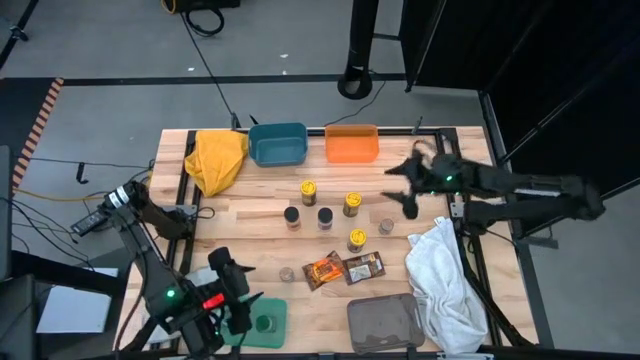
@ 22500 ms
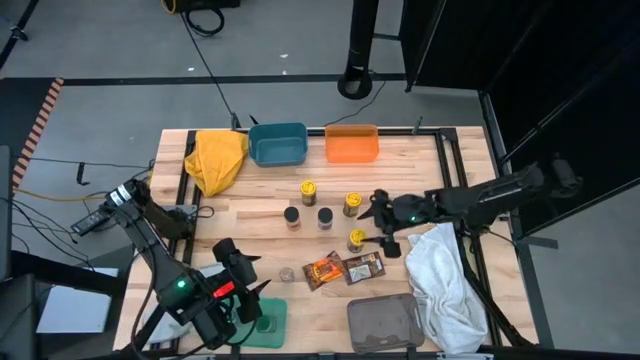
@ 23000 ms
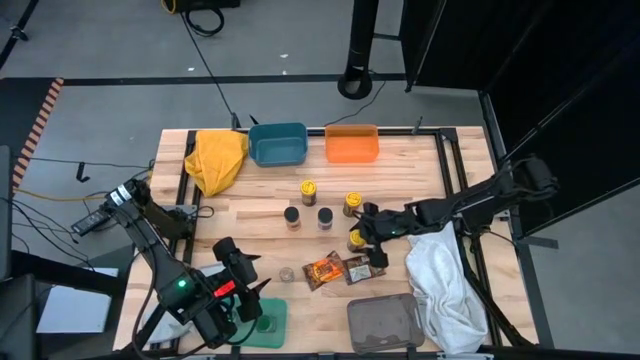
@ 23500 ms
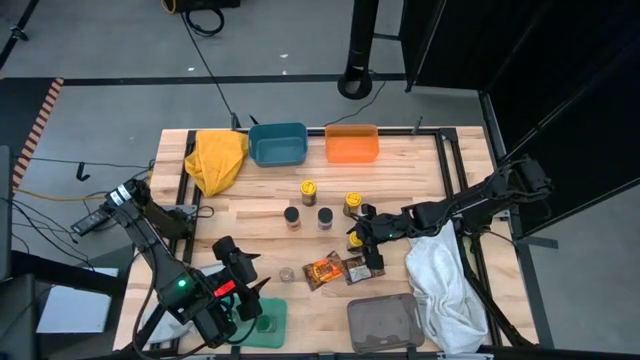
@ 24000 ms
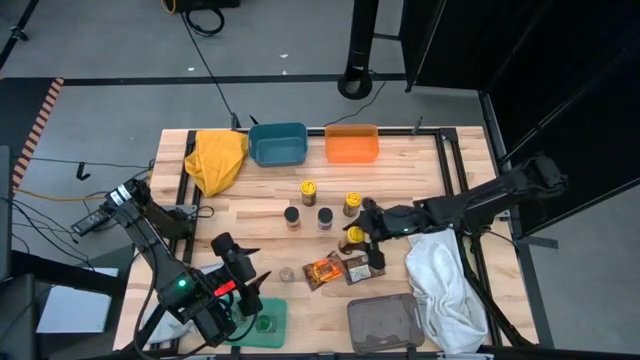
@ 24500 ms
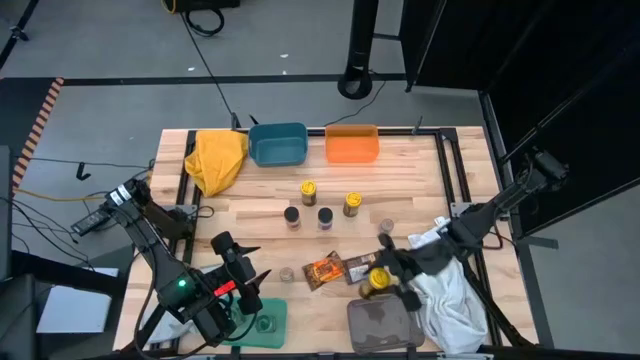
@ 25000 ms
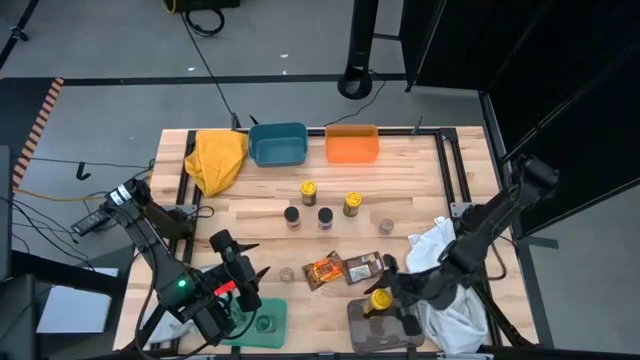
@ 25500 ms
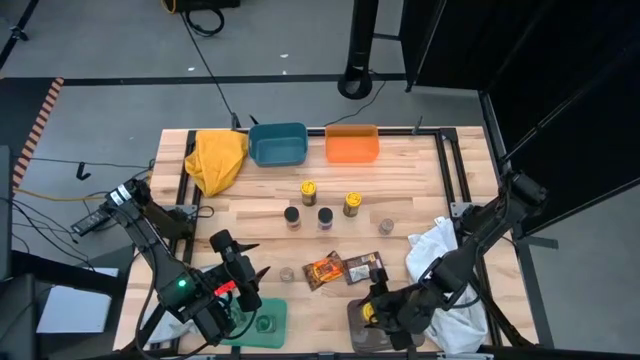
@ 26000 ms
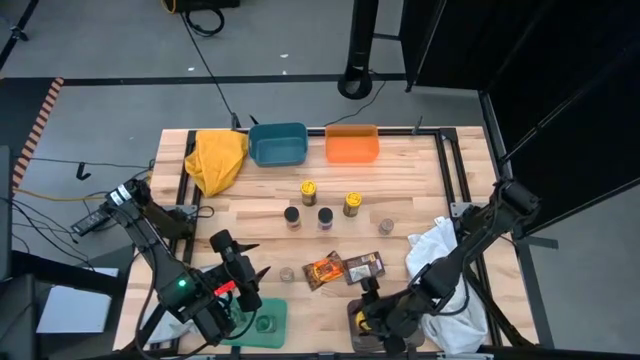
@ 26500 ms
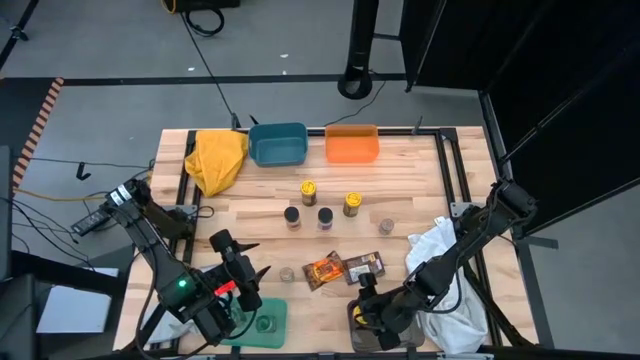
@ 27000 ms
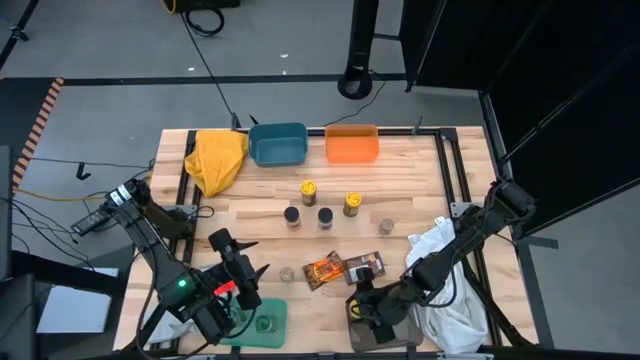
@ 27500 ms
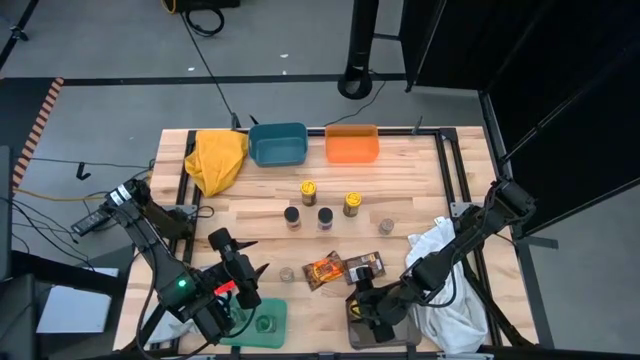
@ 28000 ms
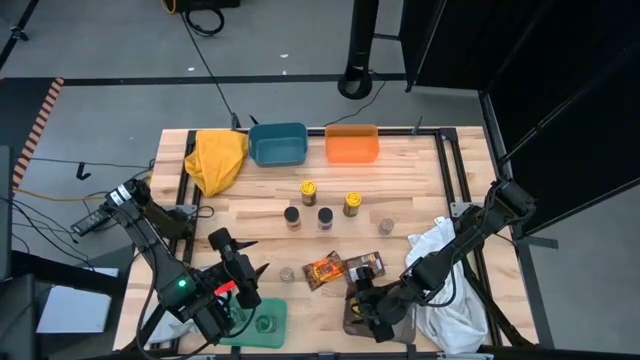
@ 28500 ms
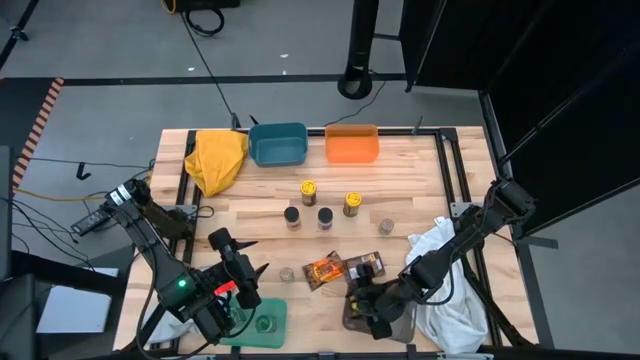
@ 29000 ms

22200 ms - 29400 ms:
Task: Sort spices by type
Put the bottom right yellow seasoning bottle into the black bin

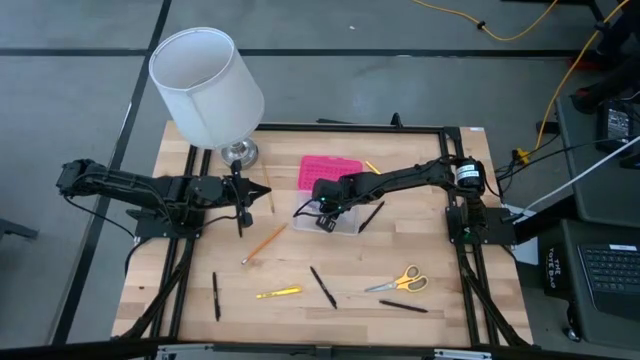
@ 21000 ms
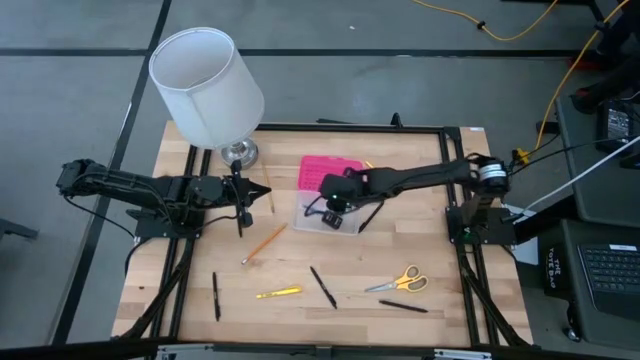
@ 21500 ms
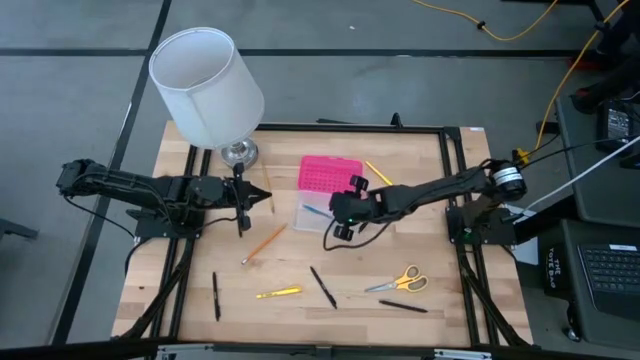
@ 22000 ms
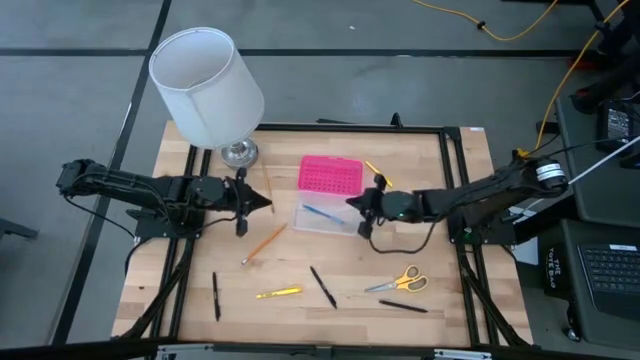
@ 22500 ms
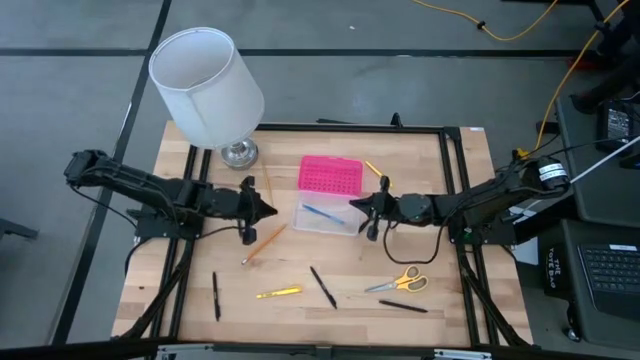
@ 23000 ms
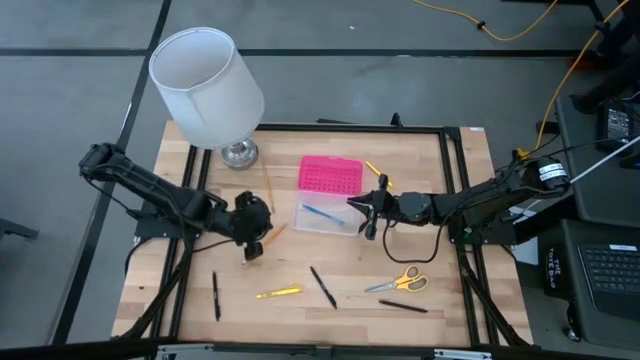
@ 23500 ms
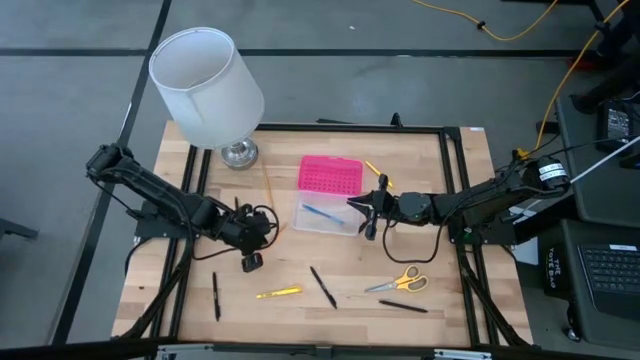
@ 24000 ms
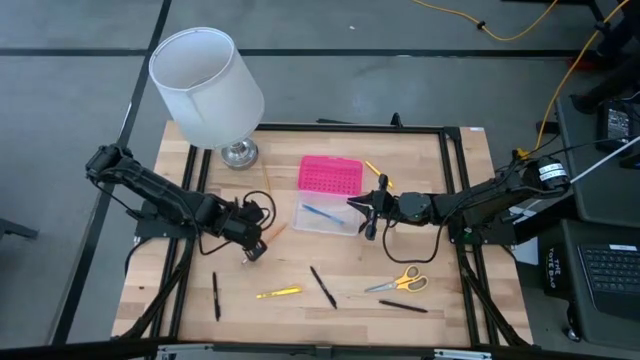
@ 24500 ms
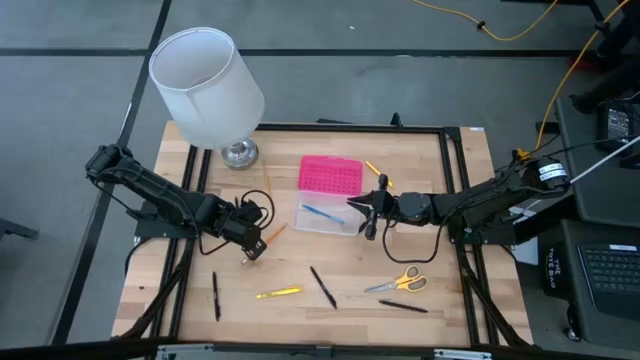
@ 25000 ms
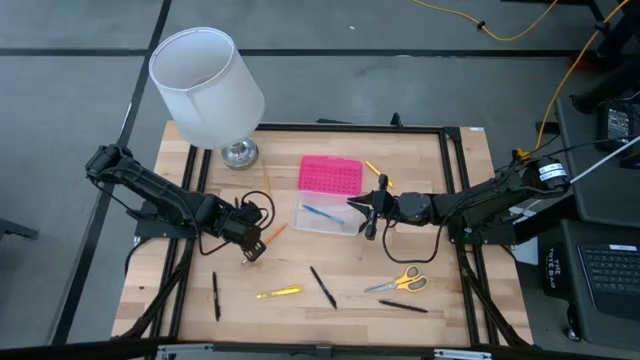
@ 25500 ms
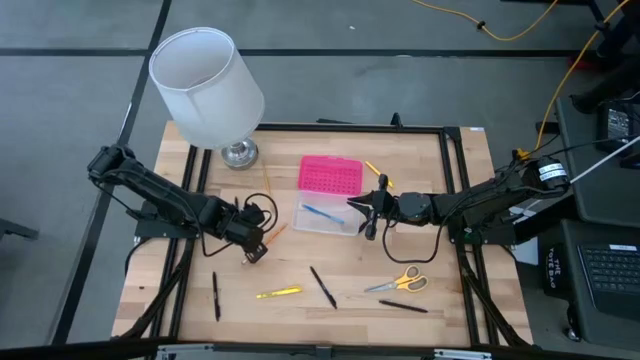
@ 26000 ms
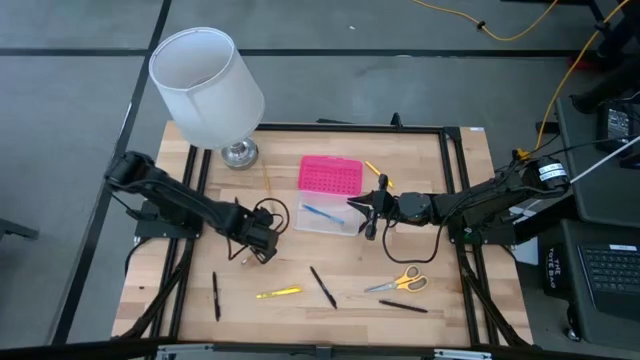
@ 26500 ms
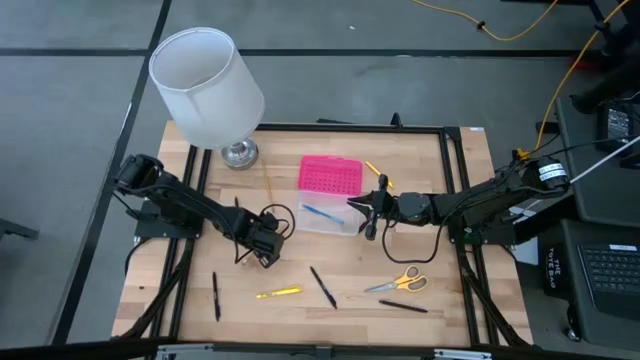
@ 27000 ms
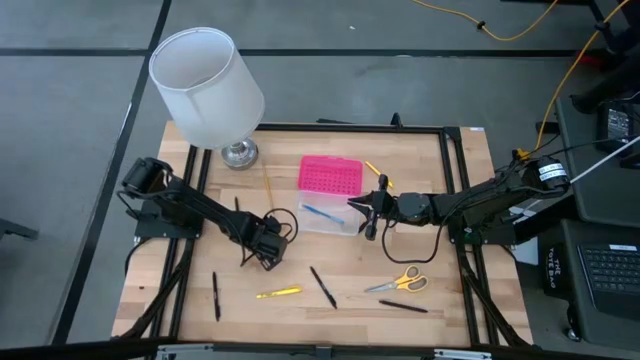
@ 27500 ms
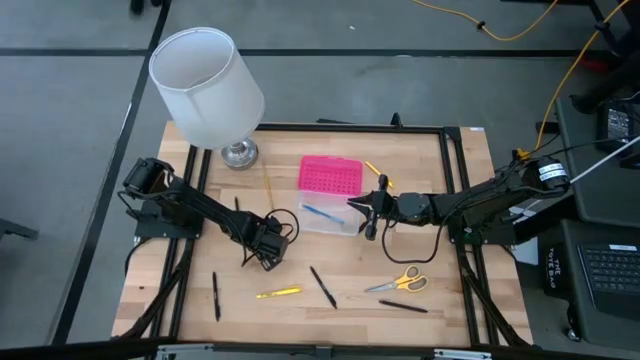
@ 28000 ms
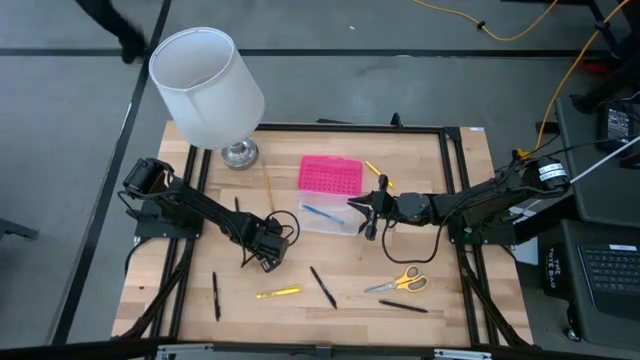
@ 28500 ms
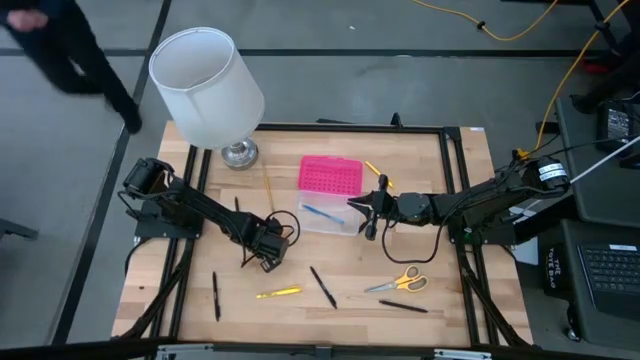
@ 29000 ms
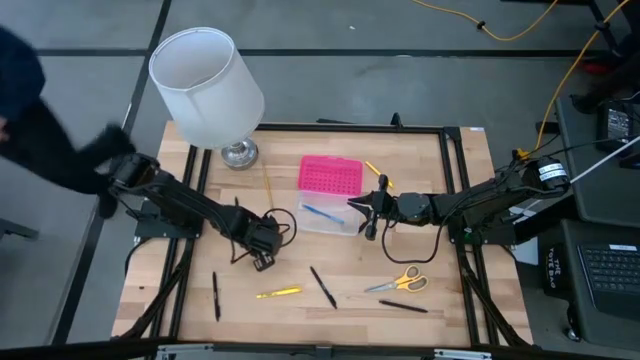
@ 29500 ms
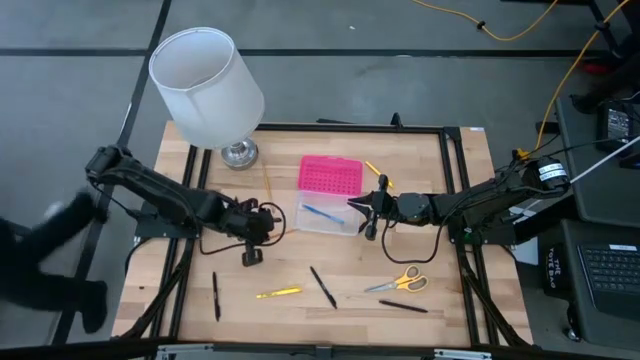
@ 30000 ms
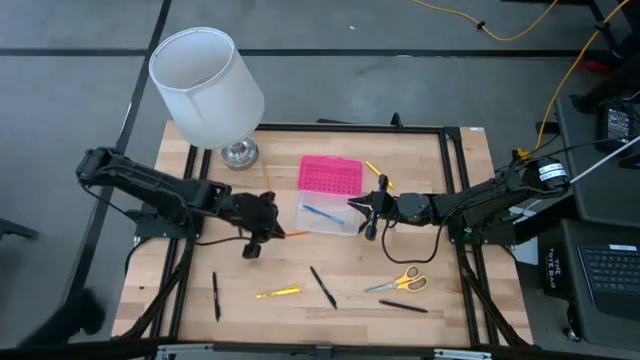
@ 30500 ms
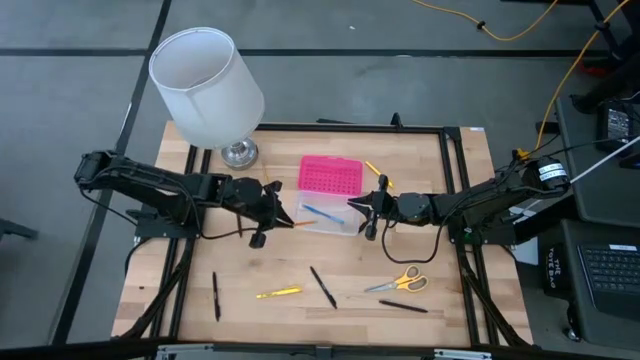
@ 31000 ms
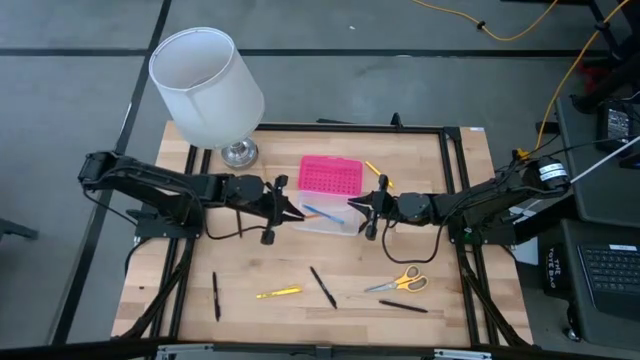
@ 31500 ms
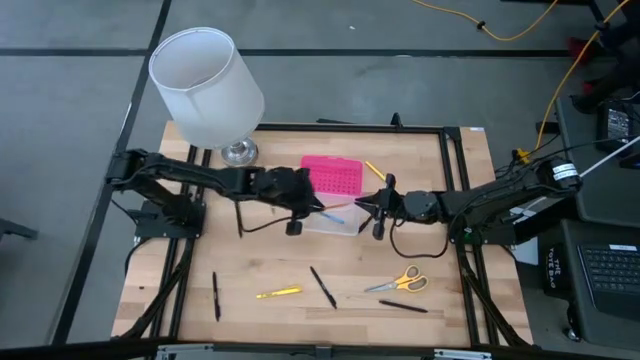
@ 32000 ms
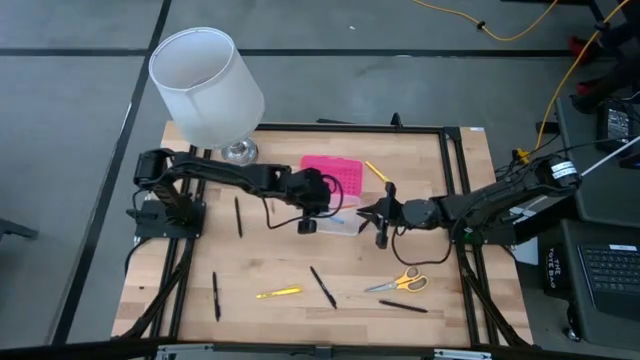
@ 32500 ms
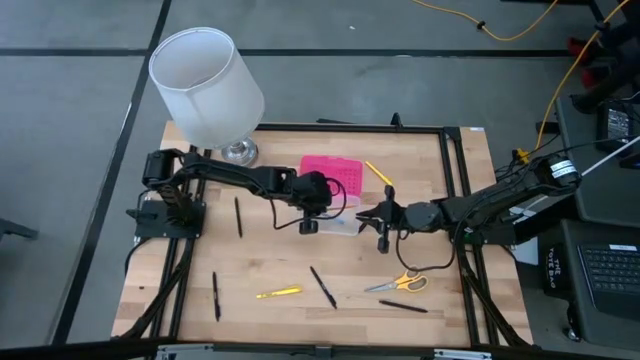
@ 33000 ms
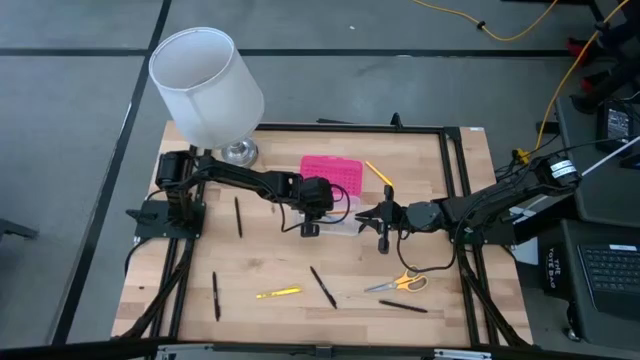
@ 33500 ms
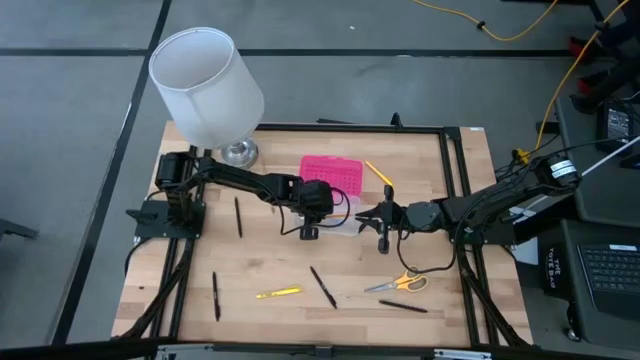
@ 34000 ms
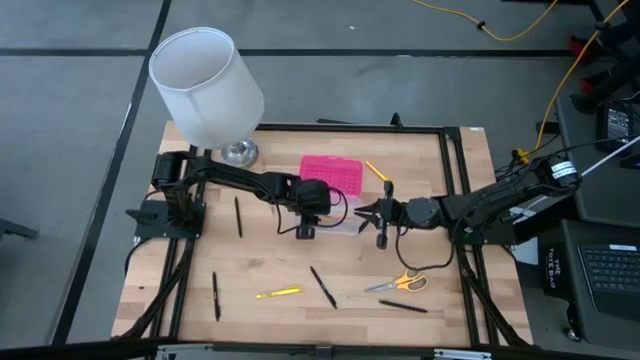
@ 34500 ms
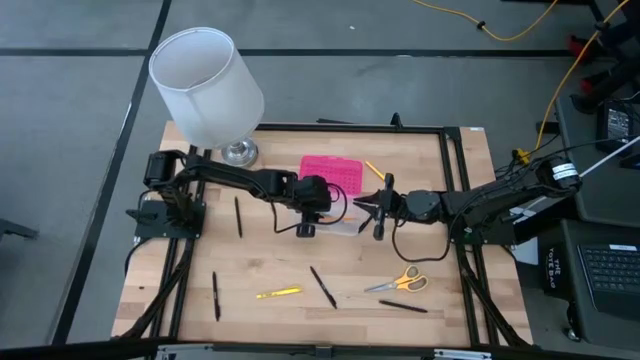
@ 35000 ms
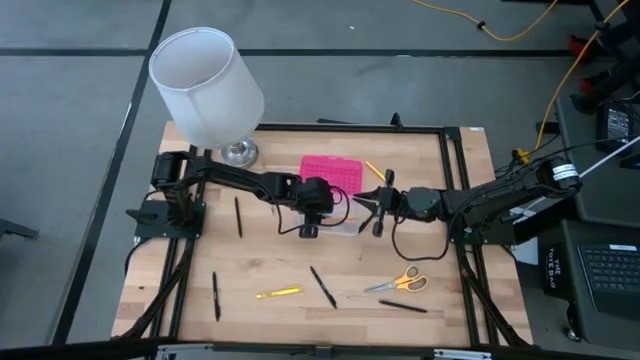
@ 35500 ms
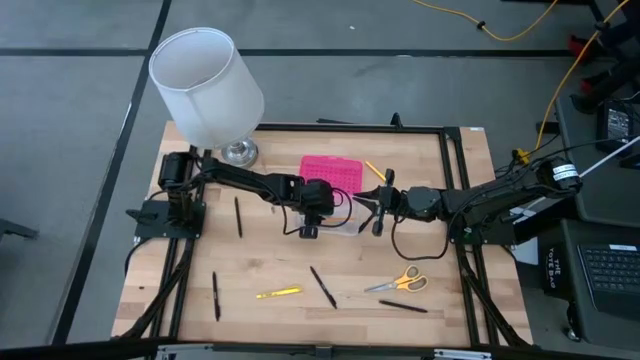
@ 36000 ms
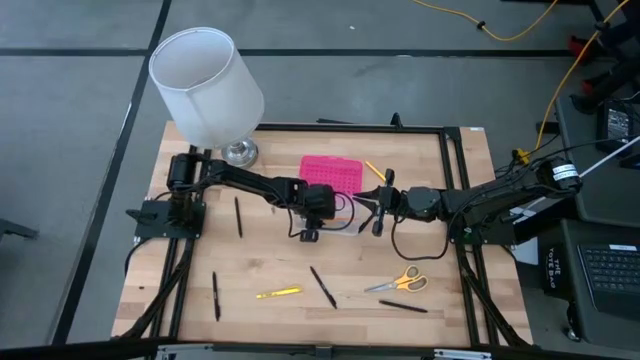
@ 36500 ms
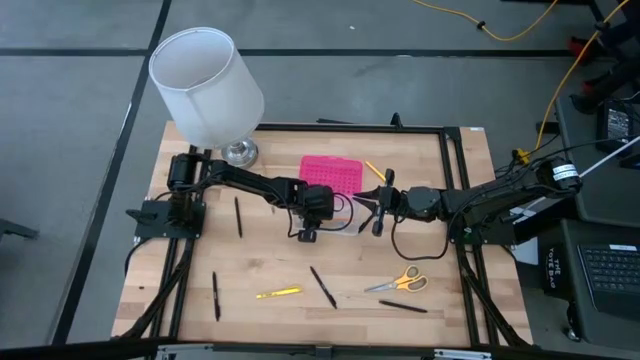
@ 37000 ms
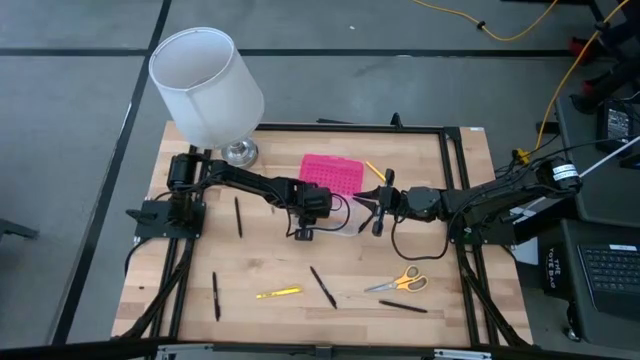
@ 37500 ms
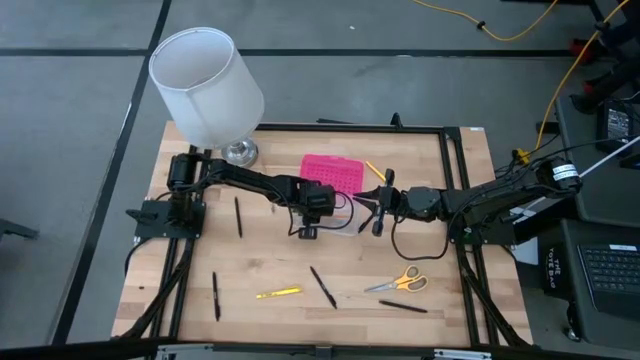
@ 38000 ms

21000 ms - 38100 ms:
Task: Pick & place school supplies into a supply box
Put the orange pencil into the transparent supply box
